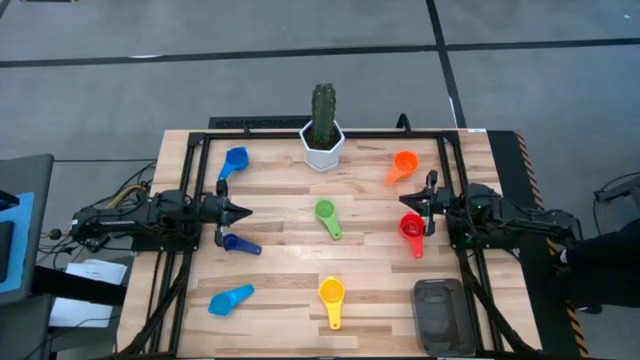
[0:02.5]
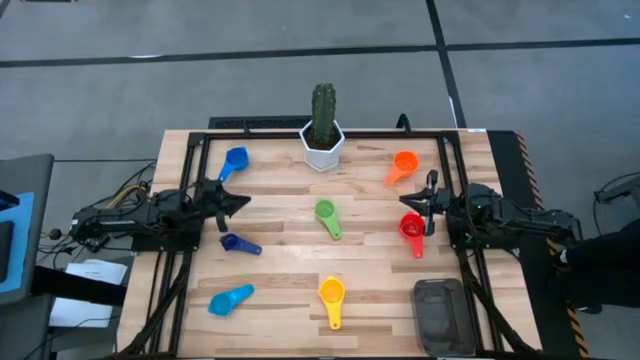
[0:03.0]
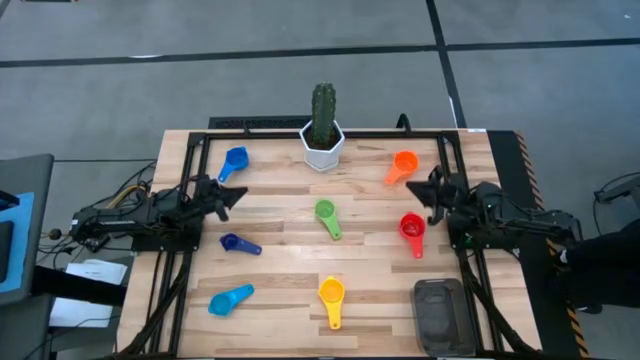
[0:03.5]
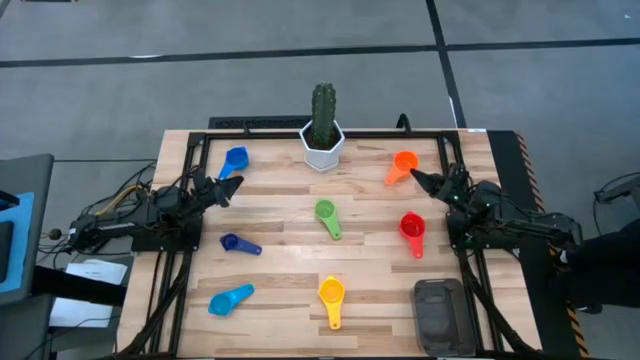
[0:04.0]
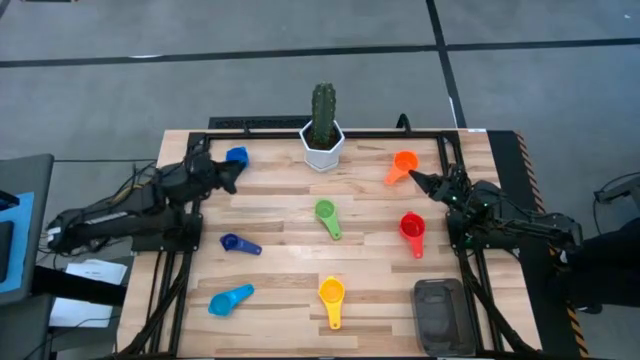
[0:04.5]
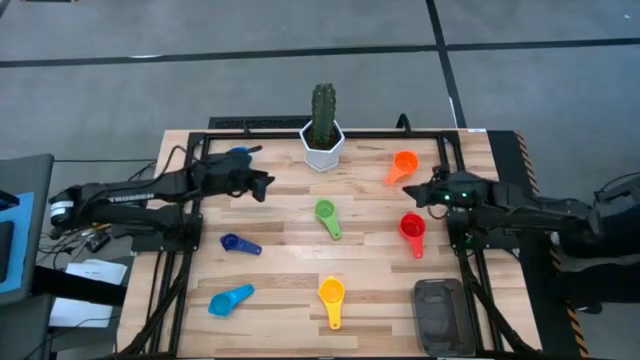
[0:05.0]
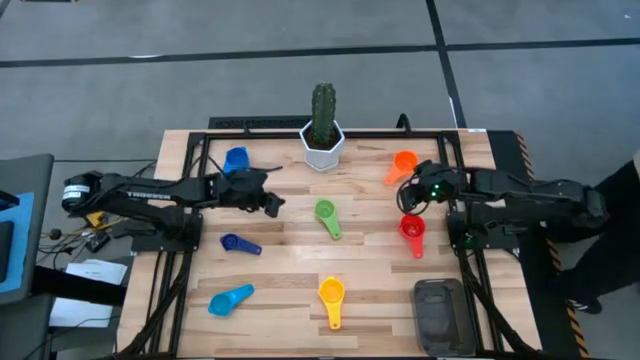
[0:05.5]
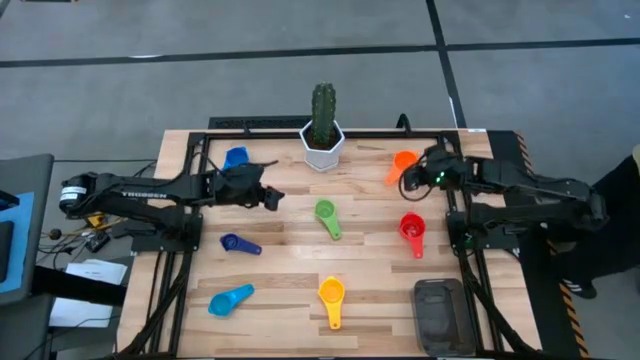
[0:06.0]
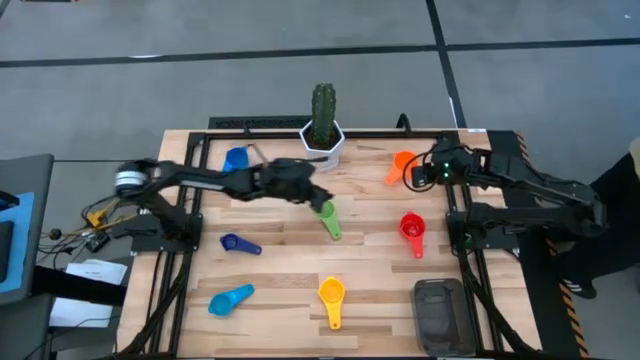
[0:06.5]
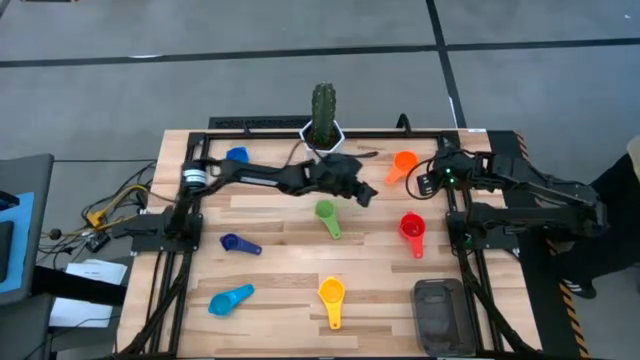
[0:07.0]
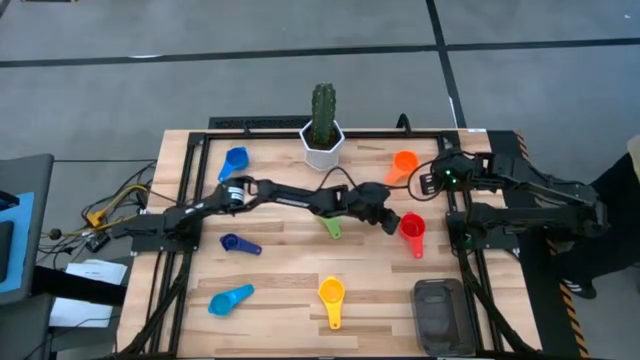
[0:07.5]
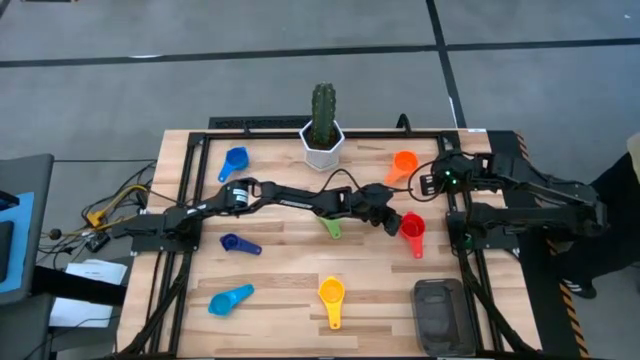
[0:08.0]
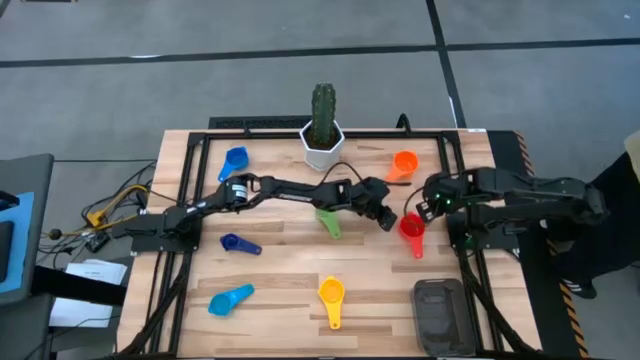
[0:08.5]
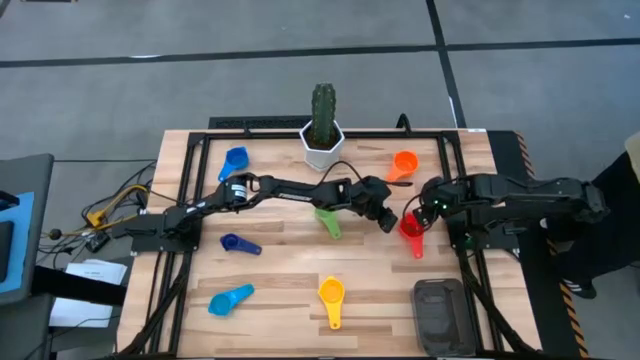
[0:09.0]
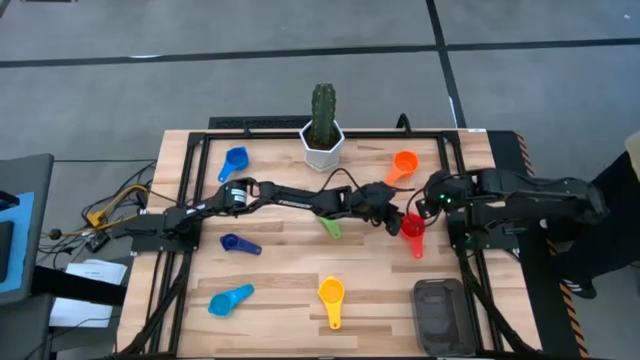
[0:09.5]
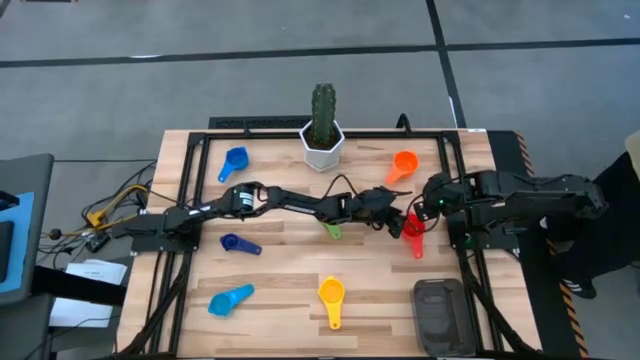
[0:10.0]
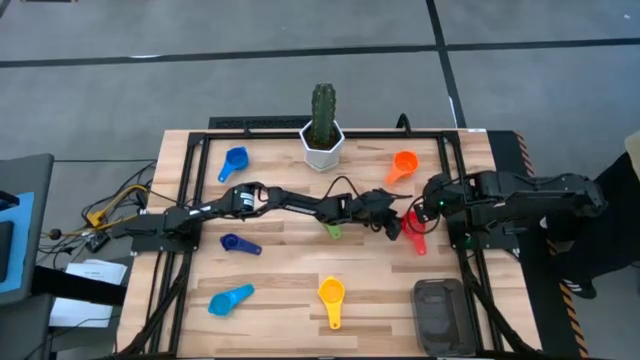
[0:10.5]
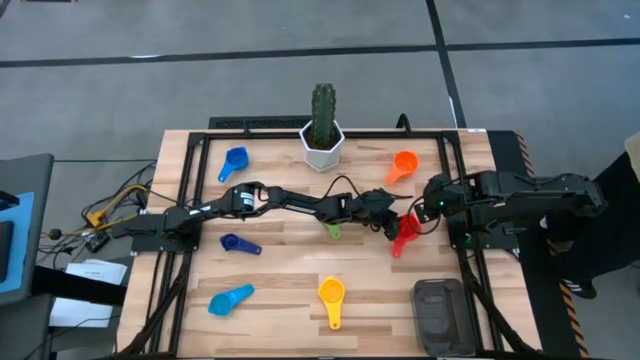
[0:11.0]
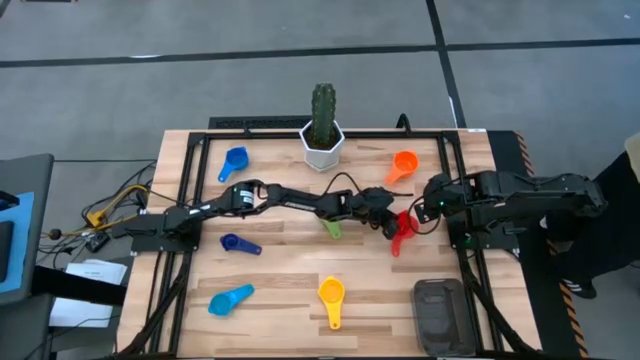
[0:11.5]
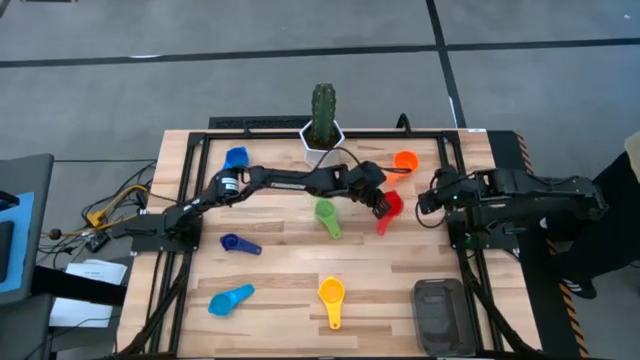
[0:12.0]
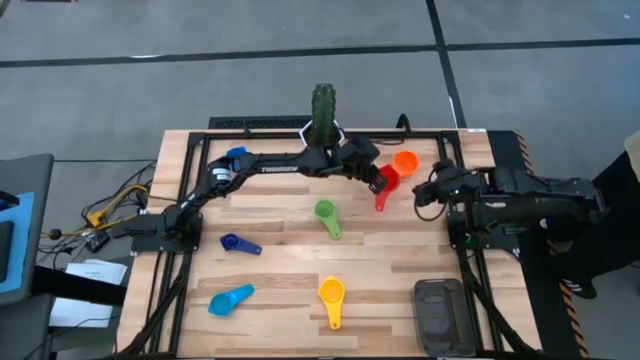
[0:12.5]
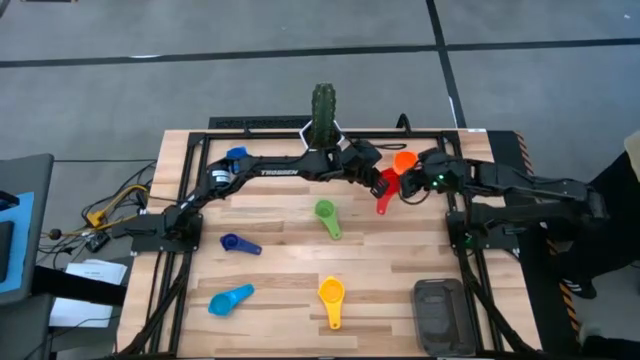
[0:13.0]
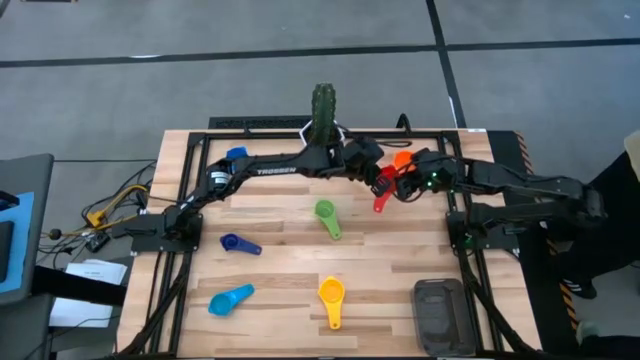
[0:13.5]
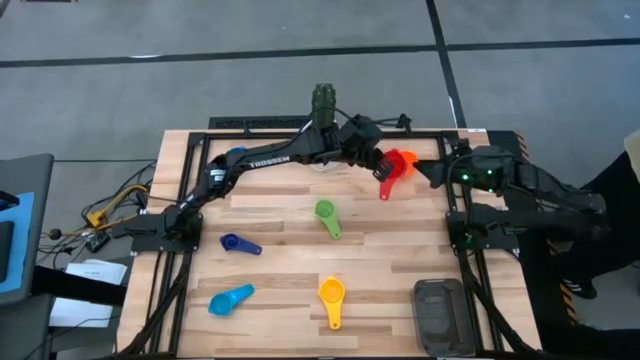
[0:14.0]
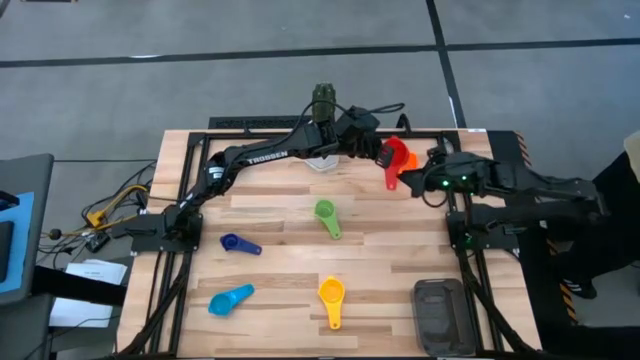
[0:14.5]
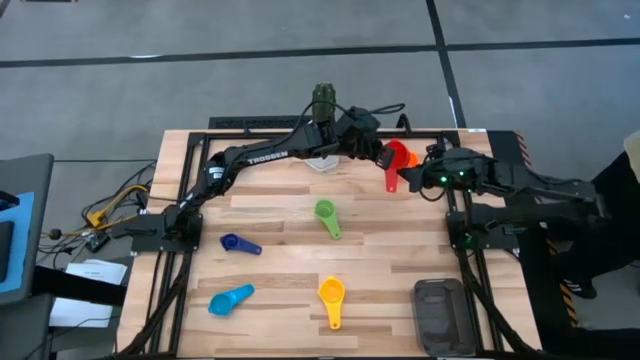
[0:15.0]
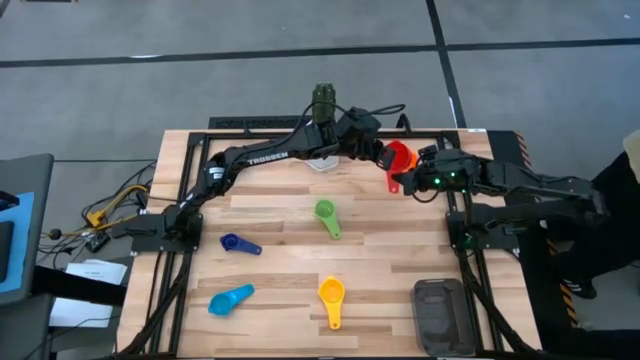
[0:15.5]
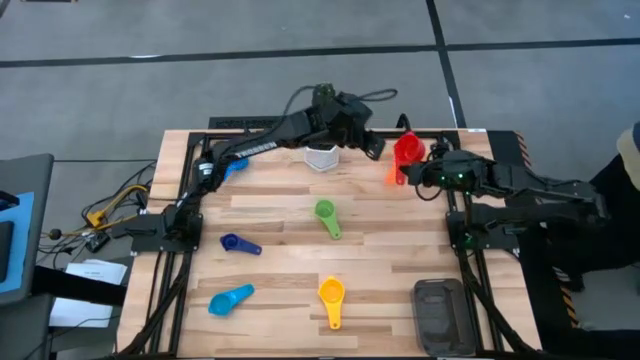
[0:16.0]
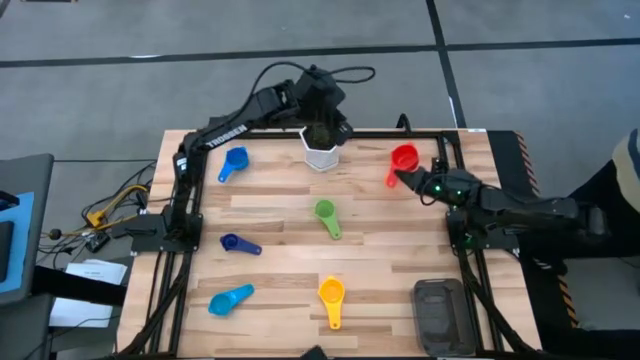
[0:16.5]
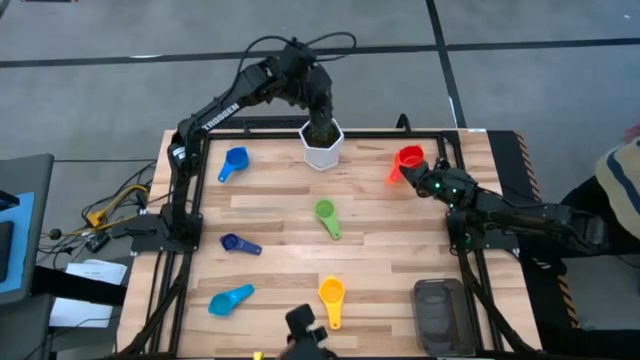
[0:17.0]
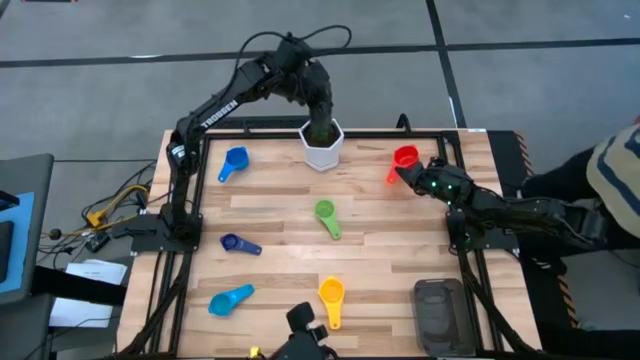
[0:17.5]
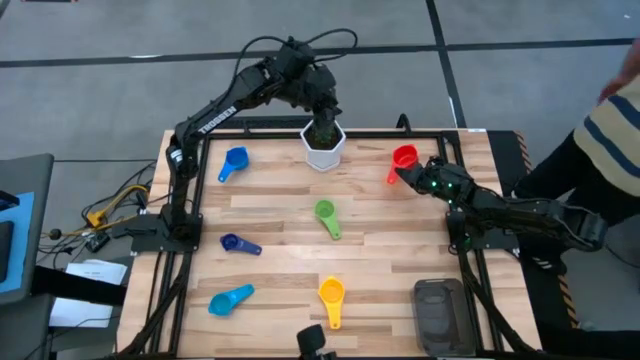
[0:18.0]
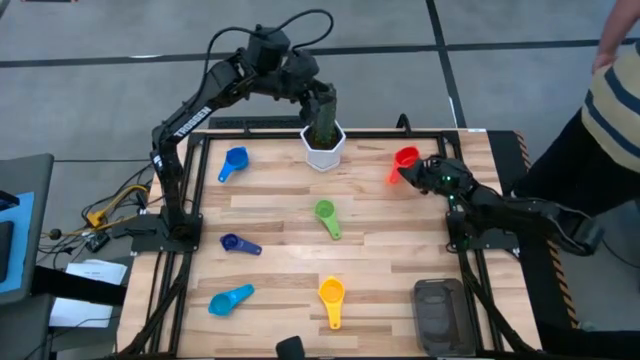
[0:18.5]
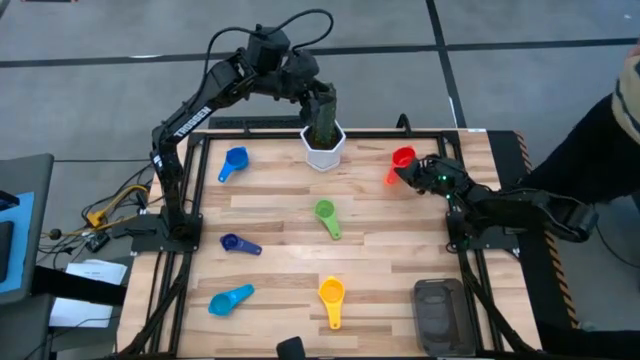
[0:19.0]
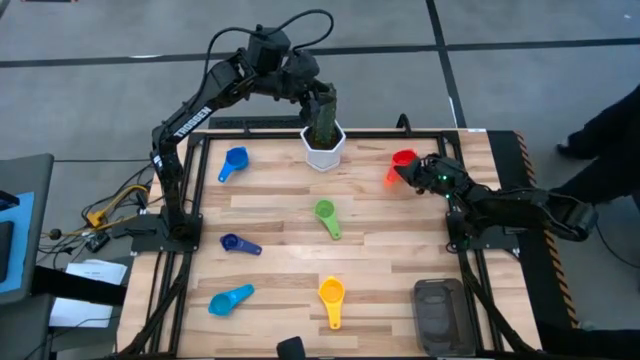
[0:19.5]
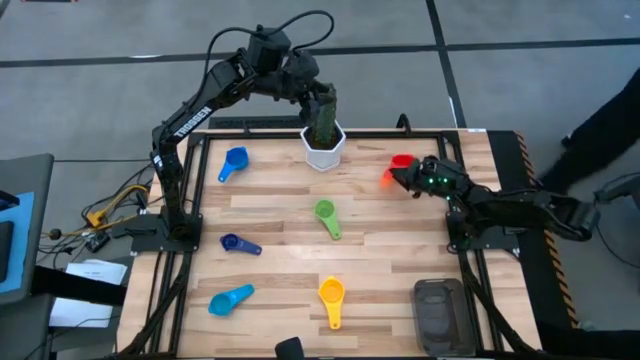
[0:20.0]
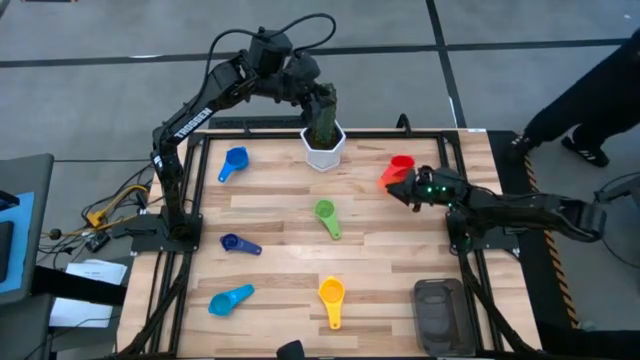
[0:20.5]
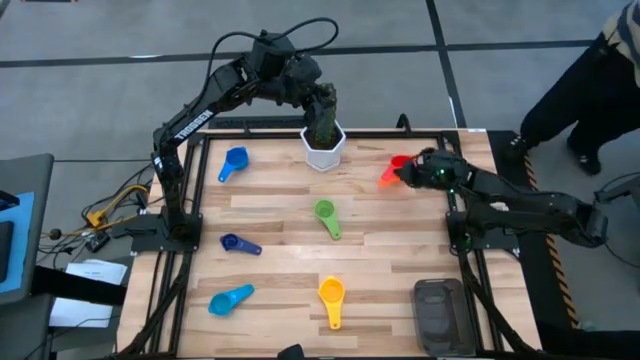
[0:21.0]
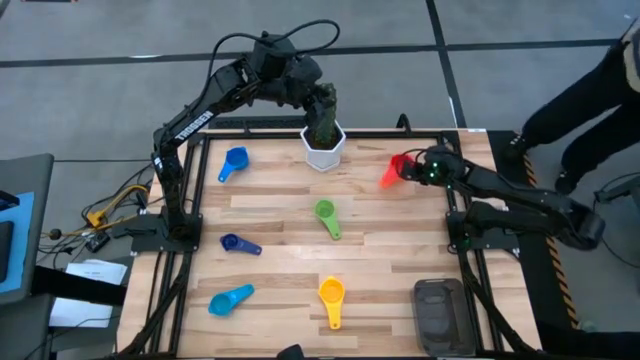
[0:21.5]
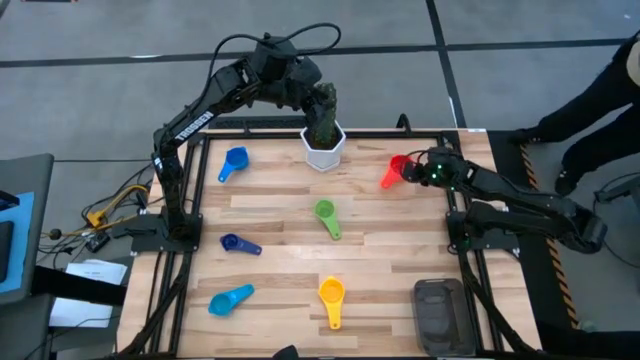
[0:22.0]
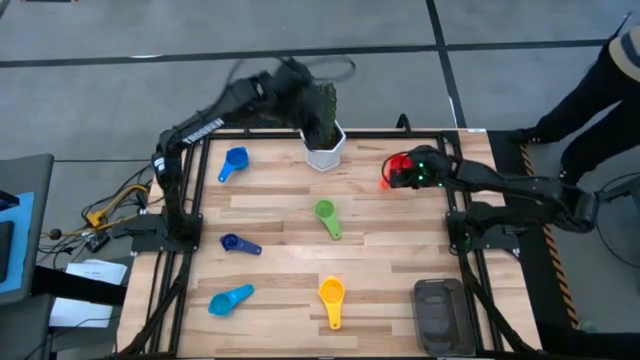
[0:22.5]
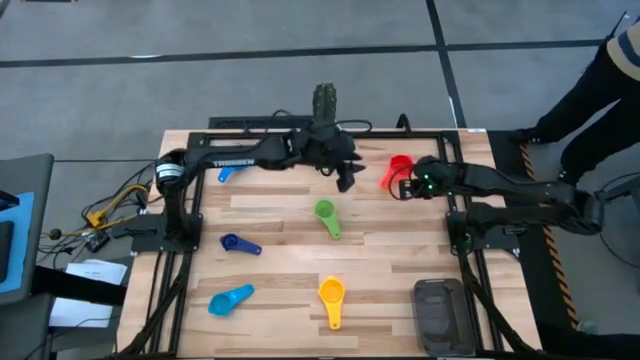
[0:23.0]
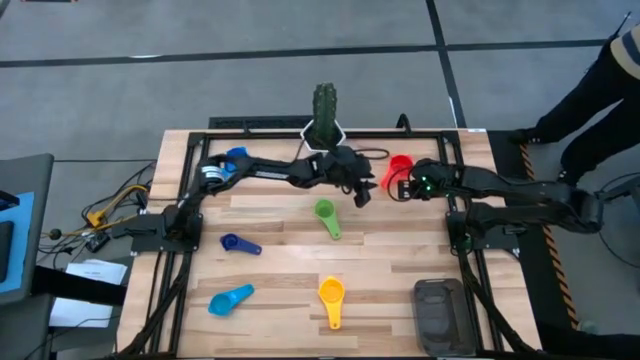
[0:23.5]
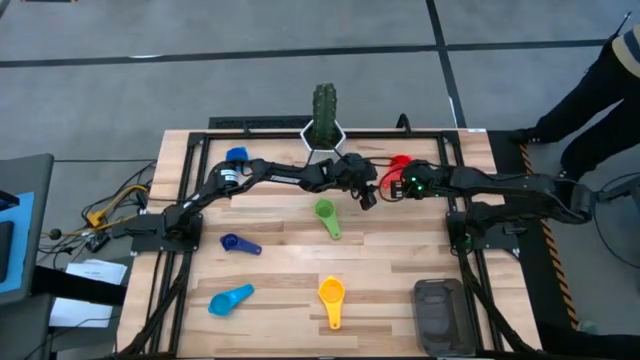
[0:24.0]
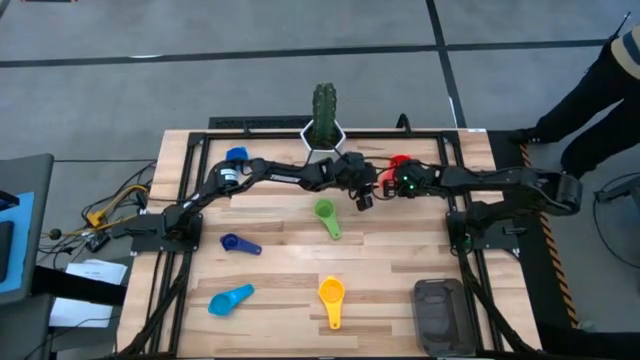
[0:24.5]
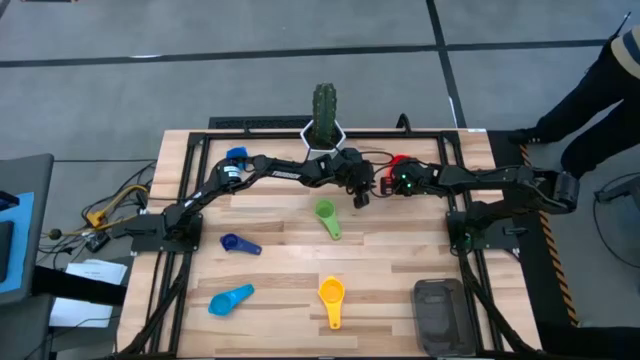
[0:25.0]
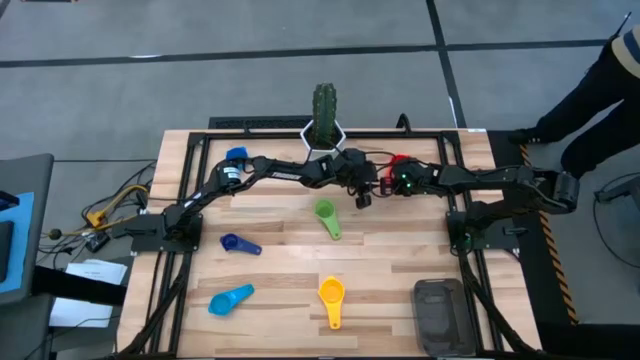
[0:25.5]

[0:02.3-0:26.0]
Task: Nest measuring cups in basket
Stack the red measuring cup on top of the orange measuring cup
